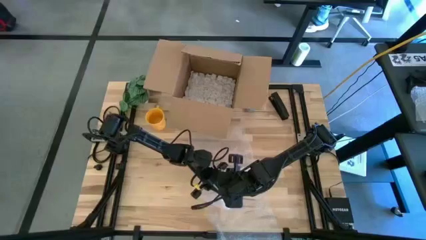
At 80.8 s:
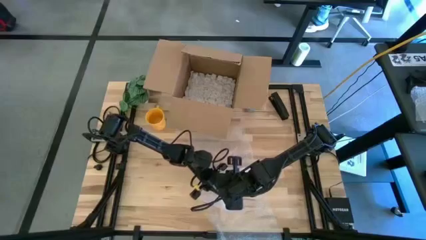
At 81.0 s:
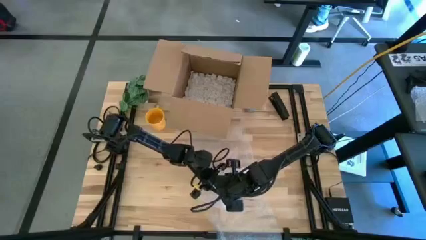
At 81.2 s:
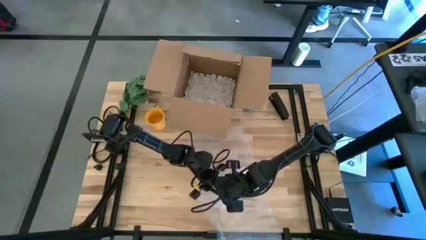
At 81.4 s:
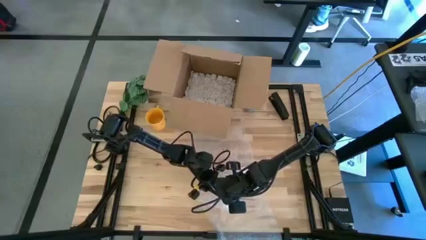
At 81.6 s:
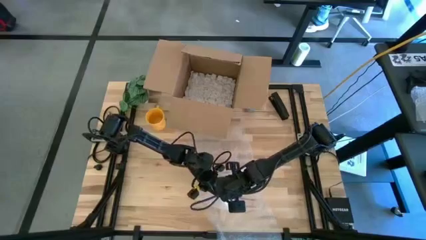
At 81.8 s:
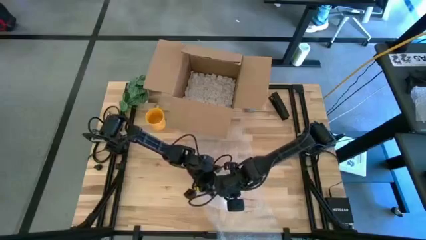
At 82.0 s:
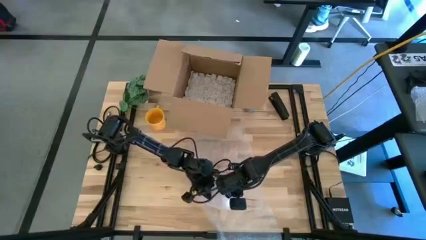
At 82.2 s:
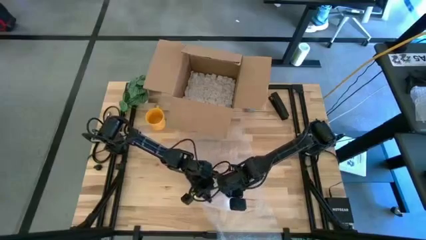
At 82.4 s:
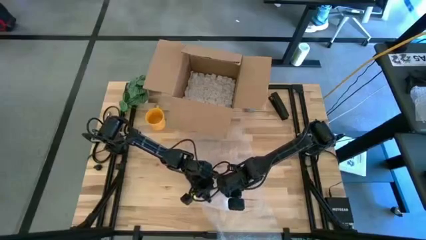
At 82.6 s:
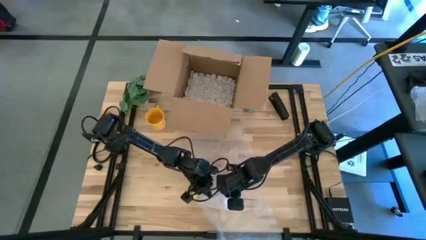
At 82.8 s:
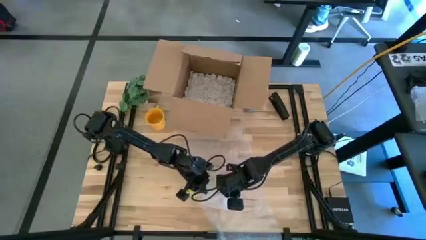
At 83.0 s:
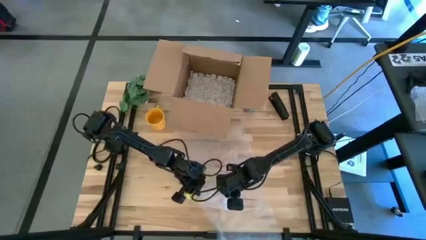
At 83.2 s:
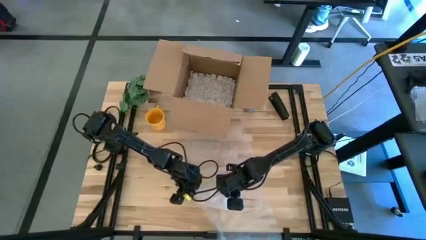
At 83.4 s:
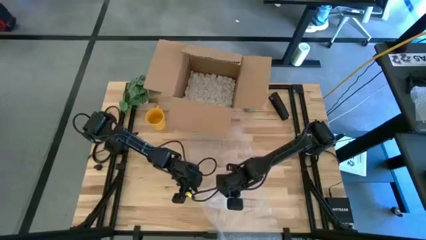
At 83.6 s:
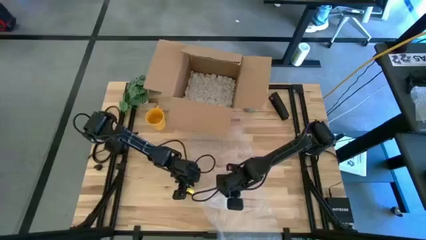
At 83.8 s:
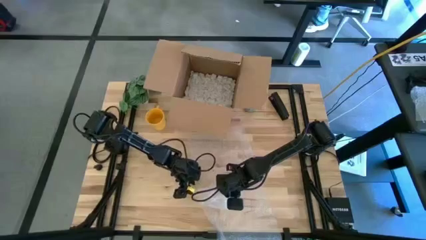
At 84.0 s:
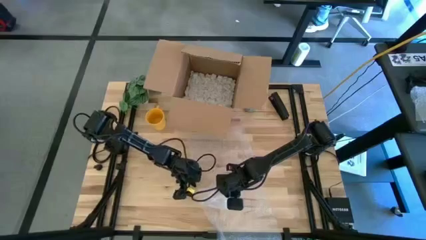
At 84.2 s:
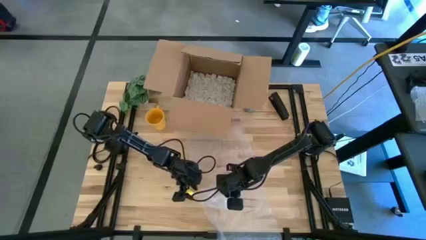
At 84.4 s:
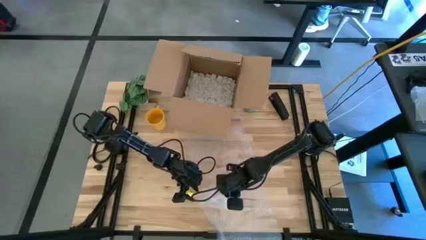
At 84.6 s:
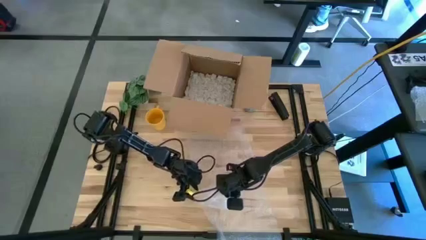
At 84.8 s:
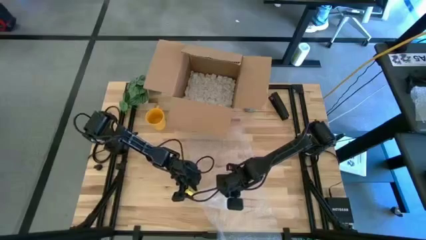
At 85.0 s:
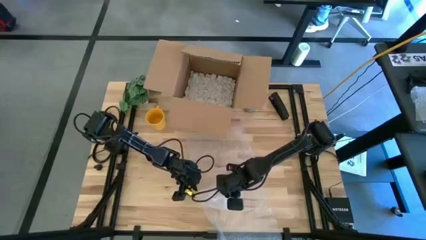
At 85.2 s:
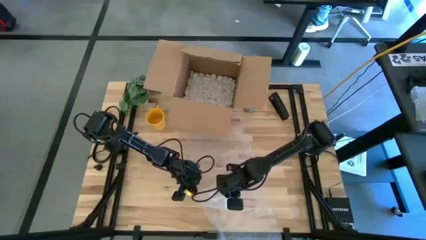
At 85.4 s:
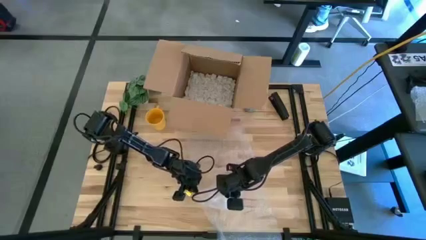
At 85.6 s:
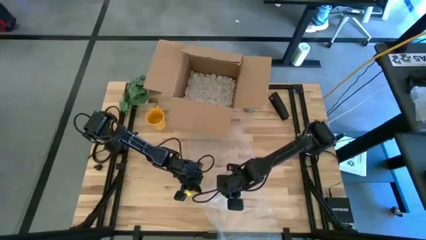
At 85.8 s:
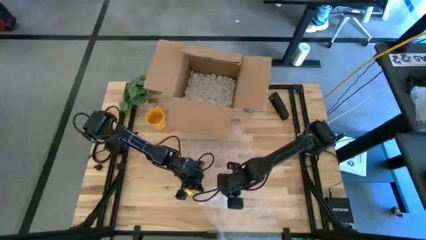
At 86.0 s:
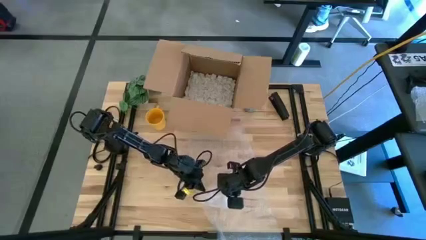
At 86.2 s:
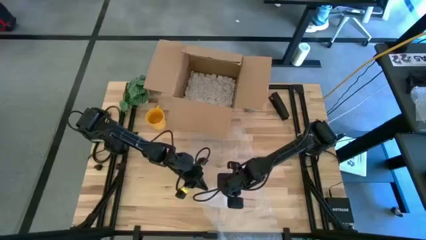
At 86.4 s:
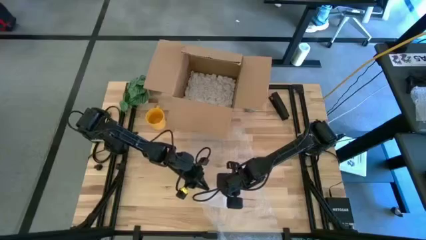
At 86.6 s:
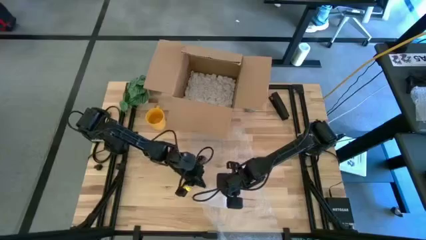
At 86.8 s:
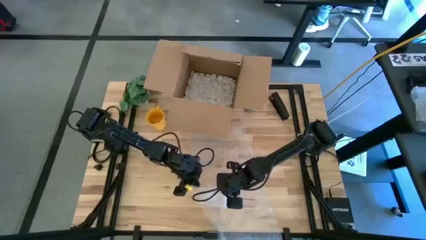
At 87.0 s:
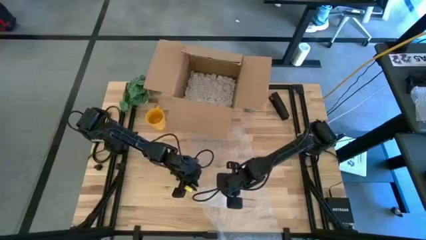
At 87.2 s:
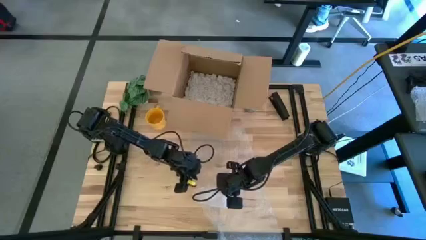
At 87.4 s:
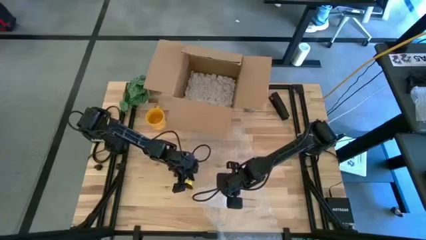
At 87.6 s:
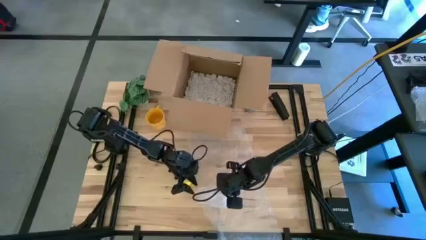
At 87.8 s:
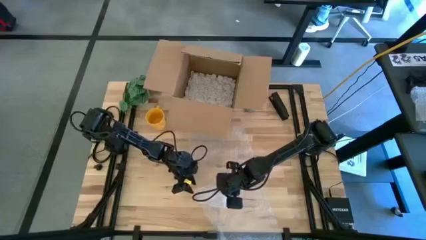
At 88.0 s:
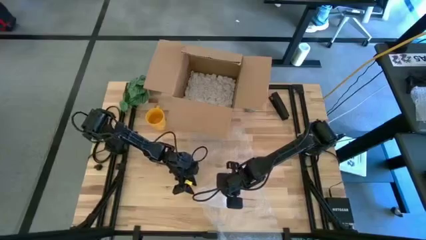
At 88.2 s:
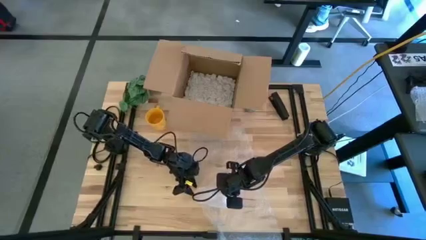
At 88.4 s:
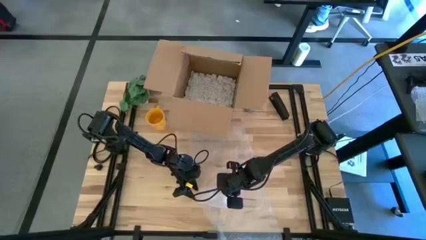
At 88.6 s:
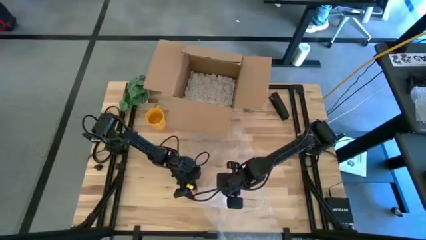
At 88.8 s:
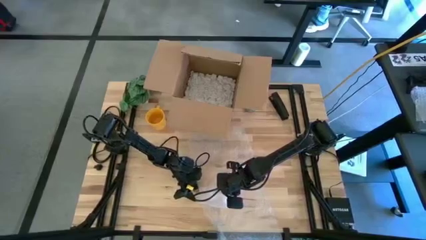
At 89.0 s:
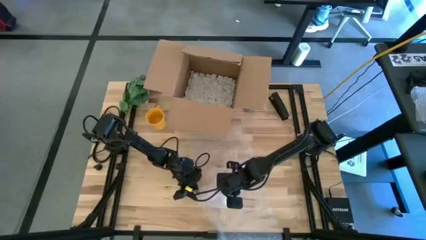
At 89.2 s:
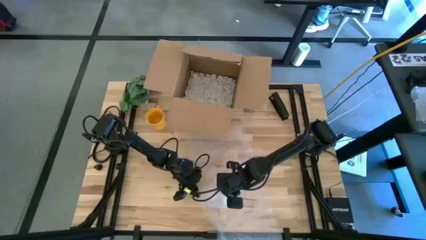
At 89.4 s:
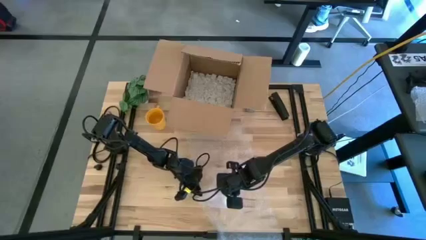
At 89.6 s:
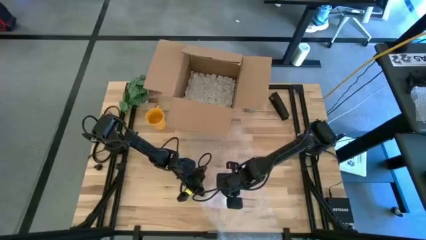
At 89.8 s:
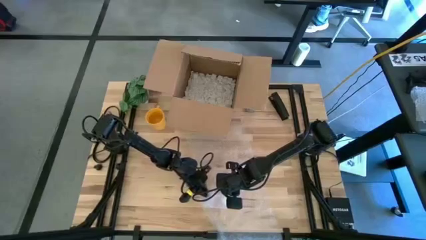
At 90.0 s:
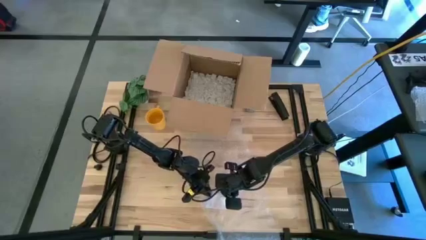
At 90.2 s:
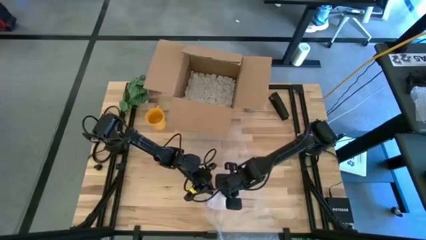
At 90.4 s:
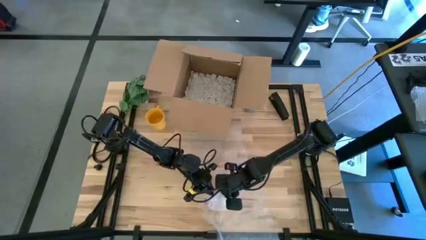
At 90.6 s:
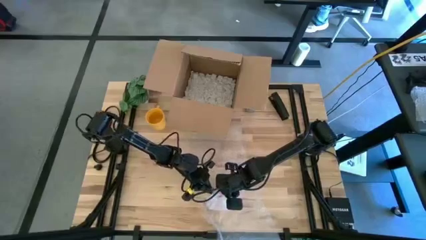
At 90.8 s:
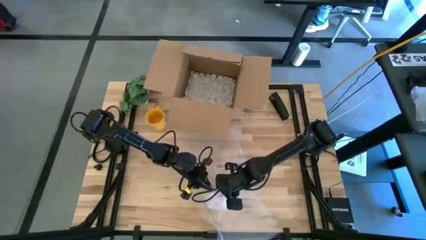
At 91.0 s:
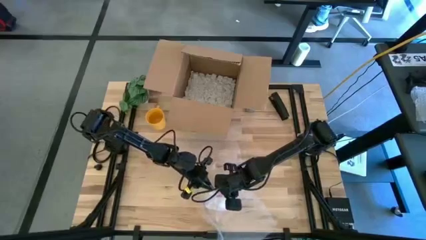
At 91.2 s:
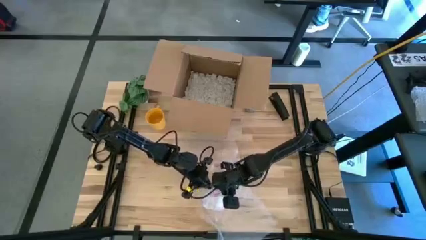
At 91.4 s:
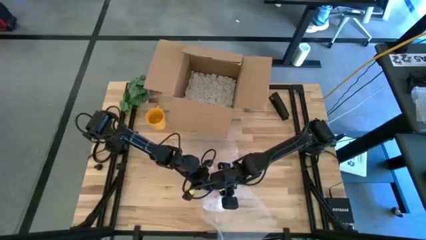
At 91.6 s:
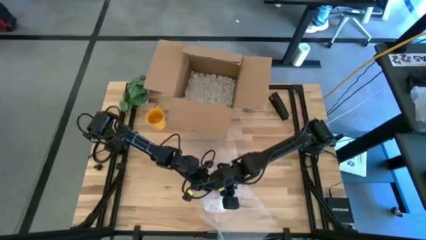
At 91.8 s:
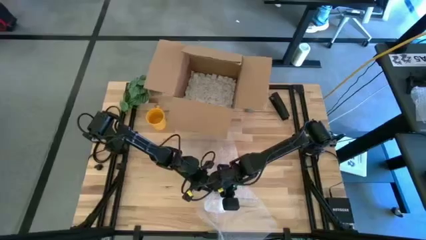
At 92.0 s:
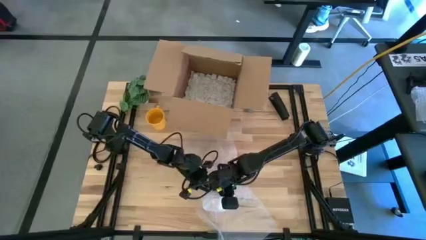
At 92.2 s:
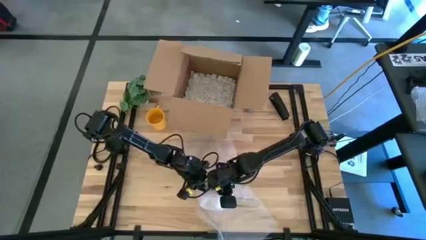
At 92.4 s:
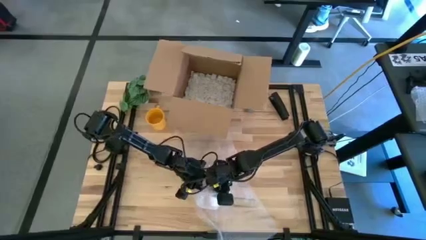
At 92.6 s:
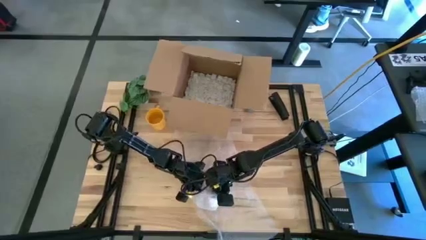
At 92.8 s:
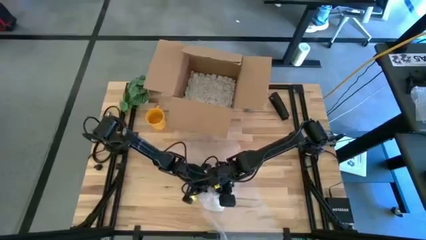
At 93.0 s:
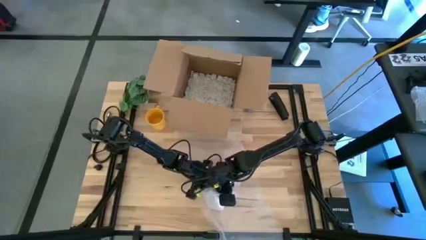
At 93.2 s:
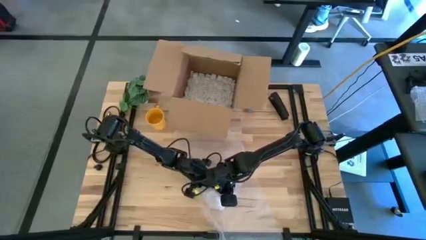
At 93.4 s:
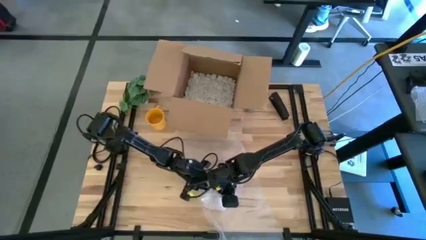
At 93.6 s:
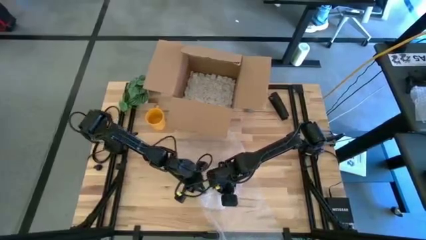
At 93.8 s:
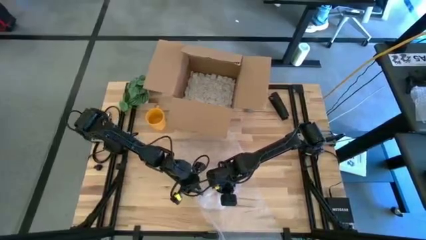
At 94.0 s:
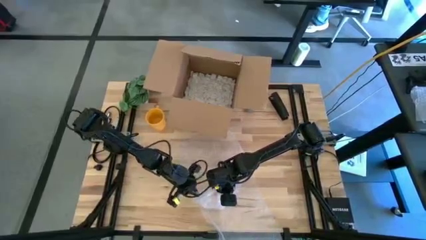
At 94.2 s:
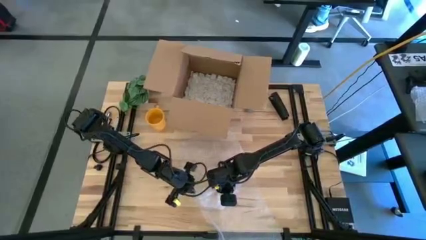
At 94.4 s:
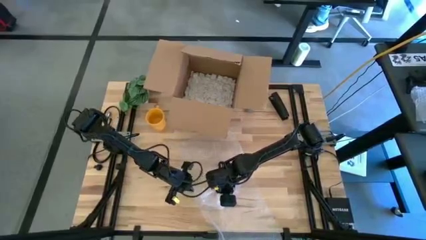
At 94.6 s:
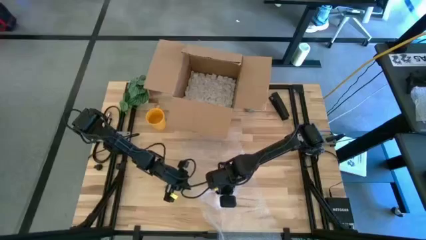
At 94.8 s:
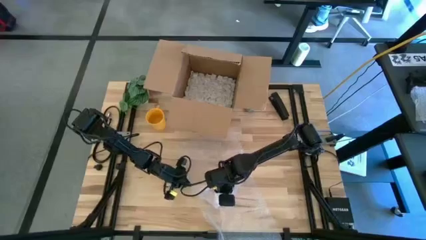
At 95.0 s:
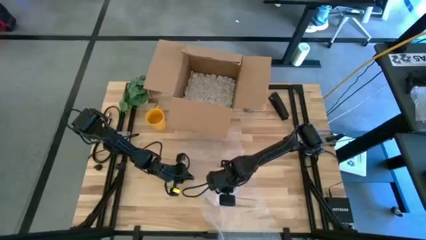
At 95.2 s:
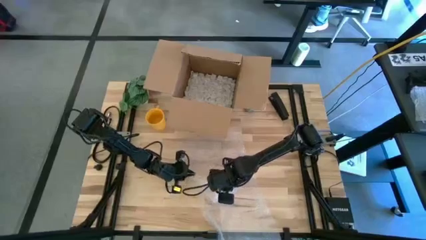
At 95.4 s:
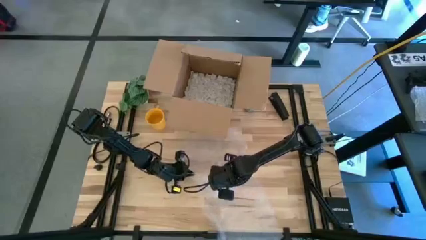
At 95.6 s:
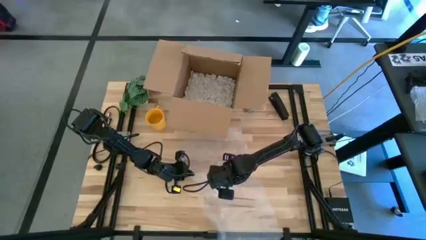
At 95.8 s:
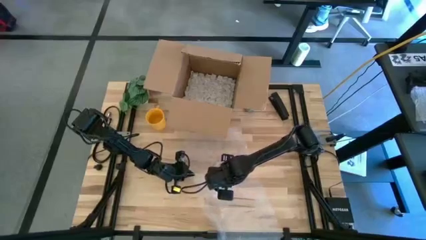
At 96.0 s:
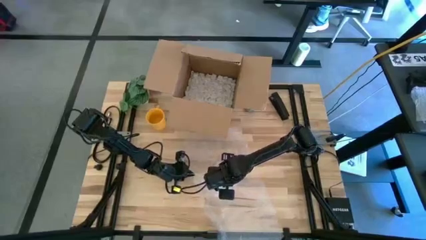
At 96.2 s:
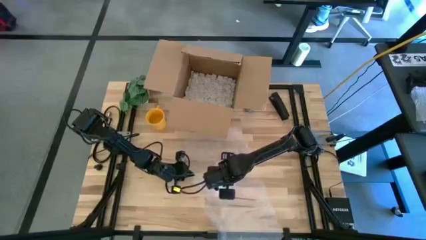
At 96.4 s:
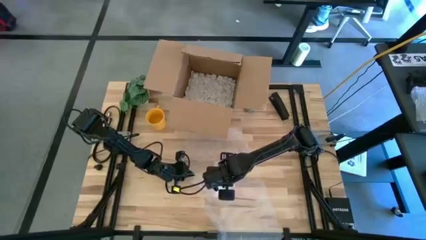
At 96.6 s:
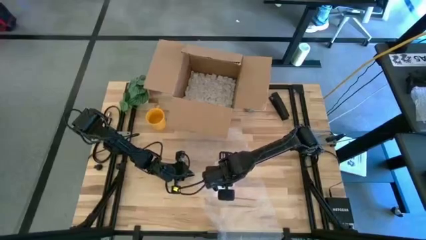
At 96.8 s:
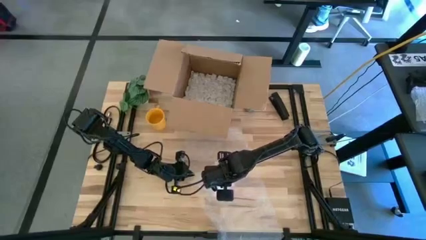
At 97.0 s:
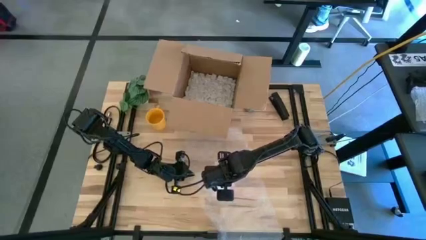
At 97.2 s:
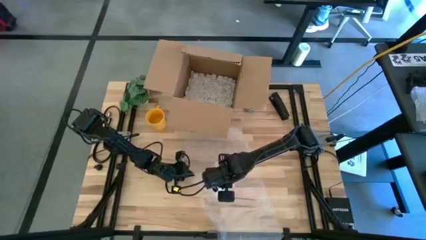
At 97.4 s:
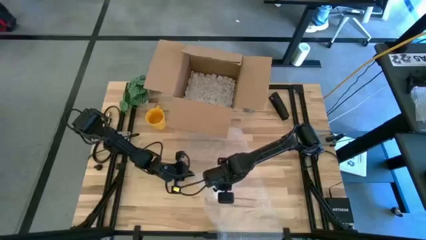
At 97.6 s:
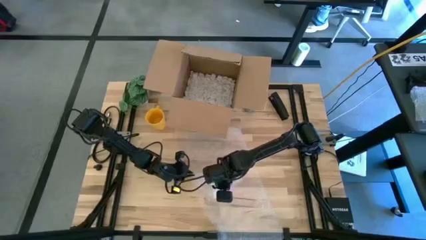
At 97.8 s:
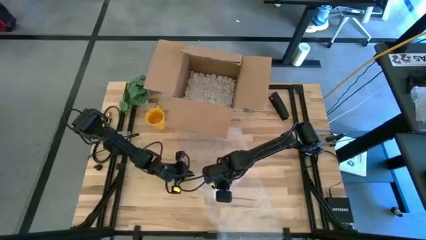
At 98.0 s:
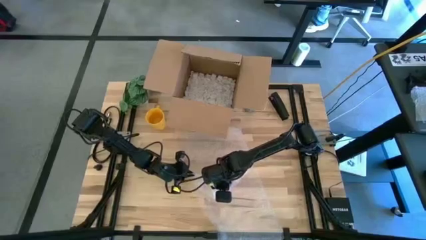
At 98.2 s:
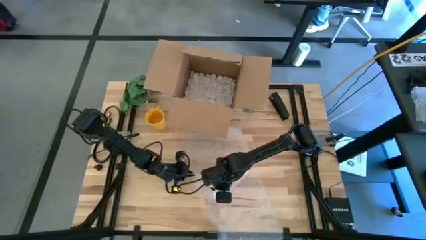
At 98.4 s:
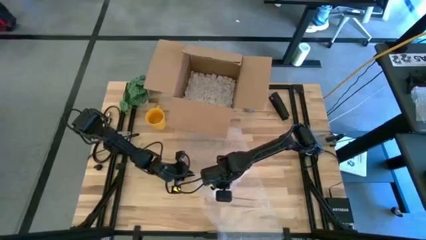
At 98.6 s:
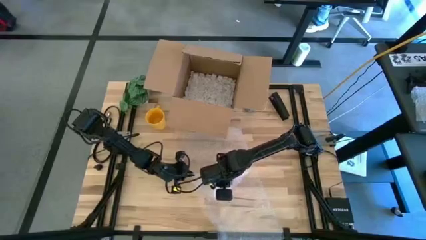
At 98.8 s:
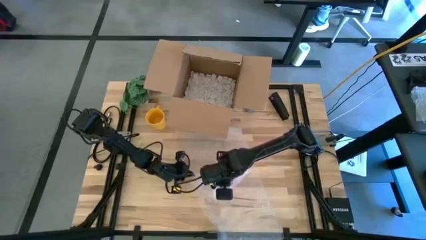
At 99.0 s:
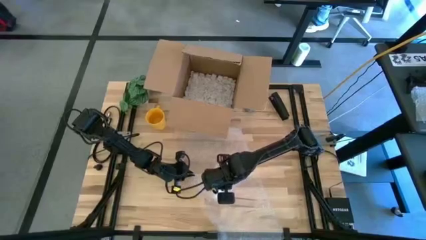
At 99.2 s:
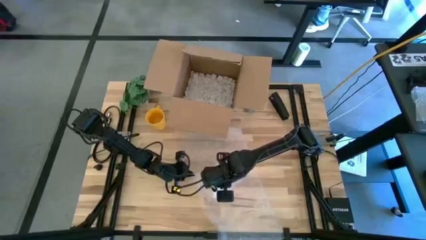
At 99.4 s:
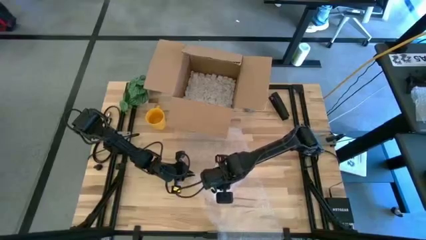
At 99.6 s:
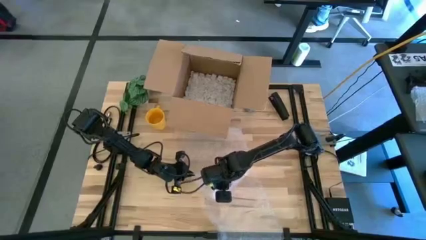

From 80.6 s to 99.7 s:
Task: wrap mug
Wrap the red mug with the bubble wrap
